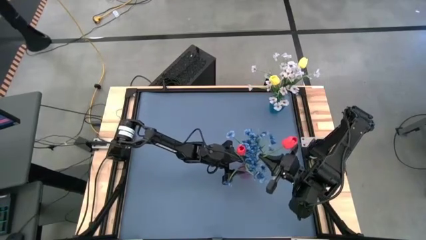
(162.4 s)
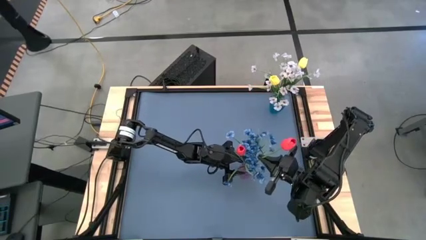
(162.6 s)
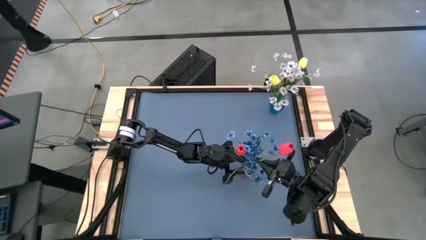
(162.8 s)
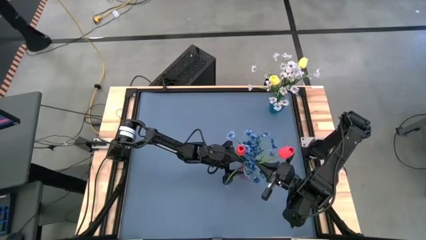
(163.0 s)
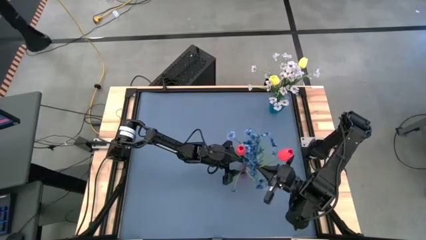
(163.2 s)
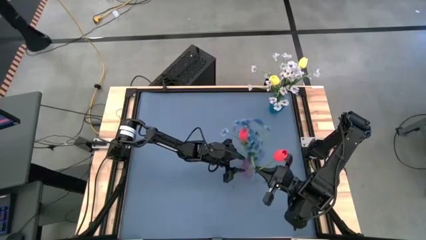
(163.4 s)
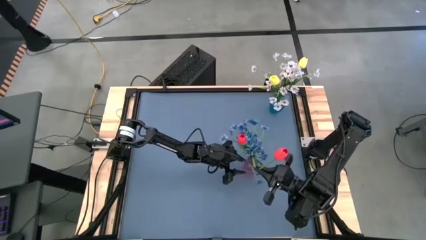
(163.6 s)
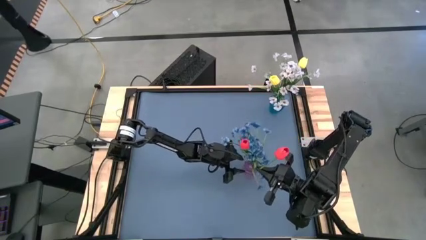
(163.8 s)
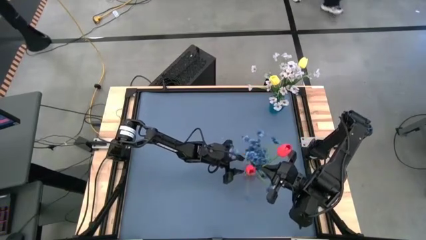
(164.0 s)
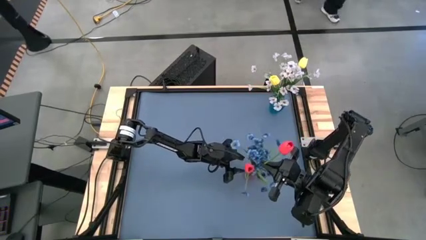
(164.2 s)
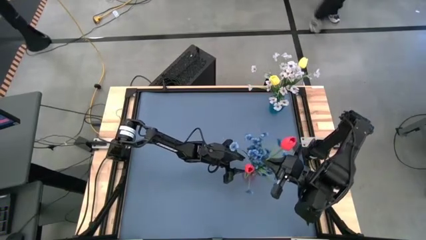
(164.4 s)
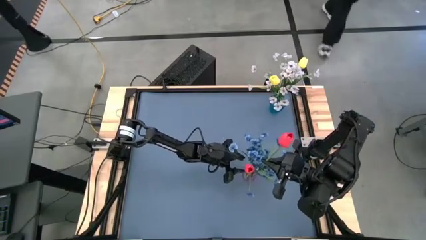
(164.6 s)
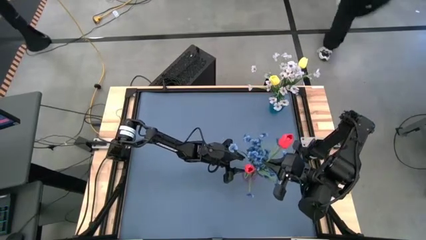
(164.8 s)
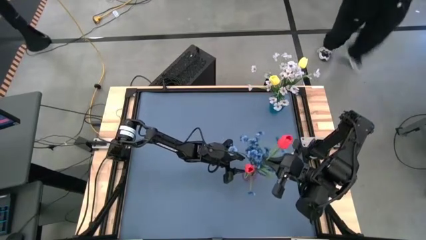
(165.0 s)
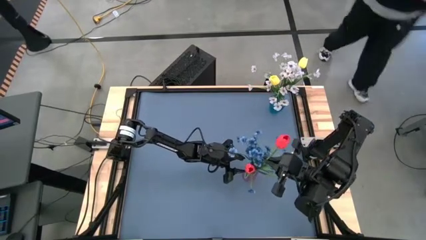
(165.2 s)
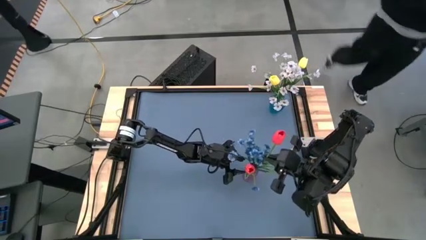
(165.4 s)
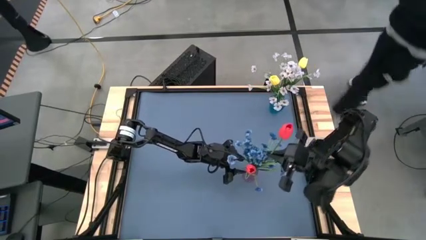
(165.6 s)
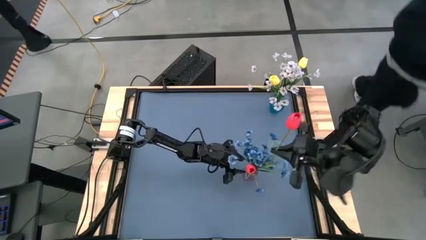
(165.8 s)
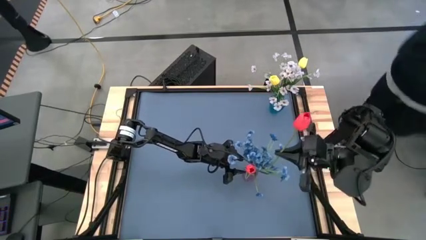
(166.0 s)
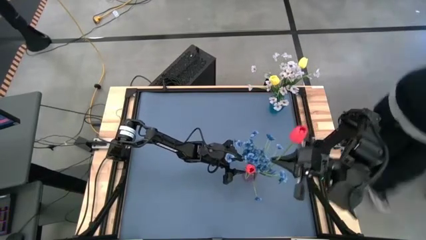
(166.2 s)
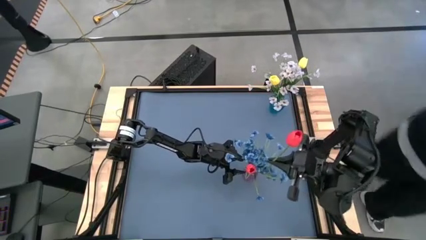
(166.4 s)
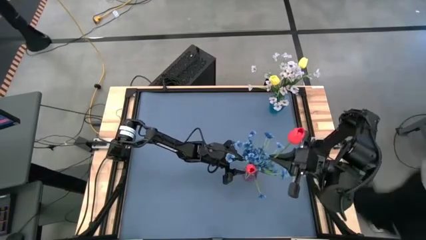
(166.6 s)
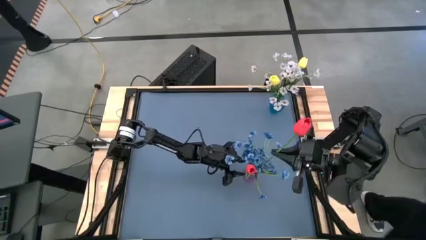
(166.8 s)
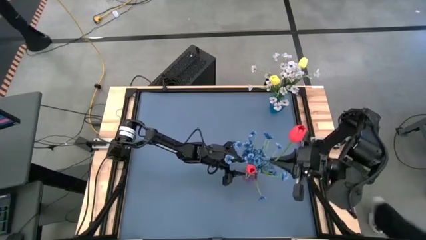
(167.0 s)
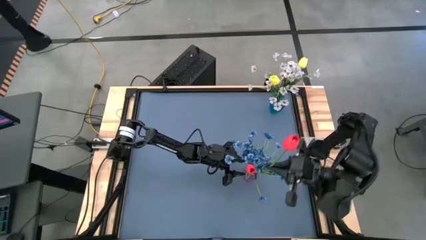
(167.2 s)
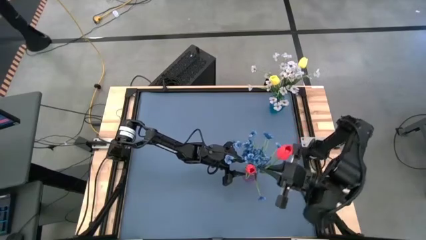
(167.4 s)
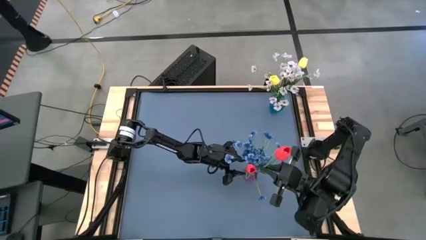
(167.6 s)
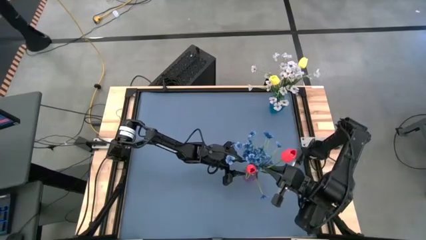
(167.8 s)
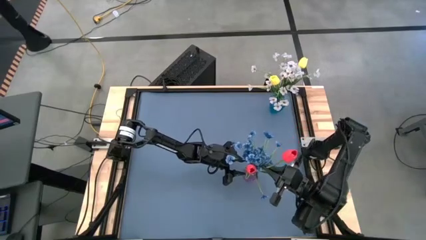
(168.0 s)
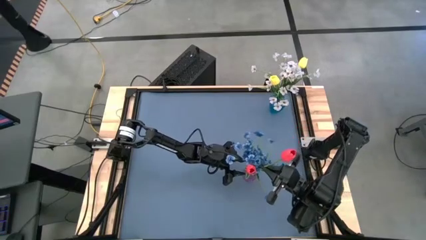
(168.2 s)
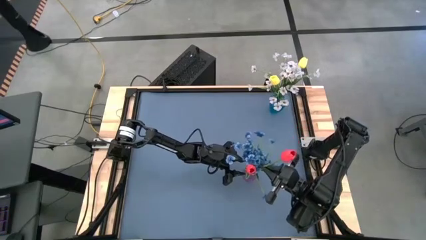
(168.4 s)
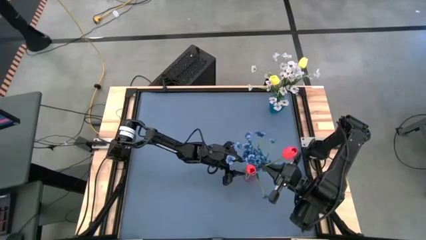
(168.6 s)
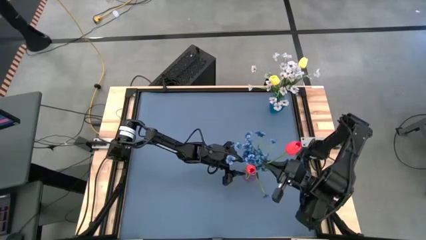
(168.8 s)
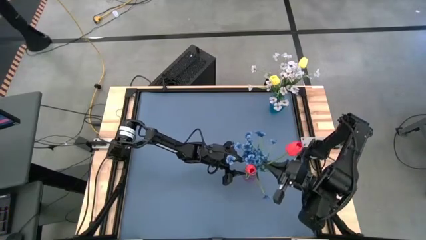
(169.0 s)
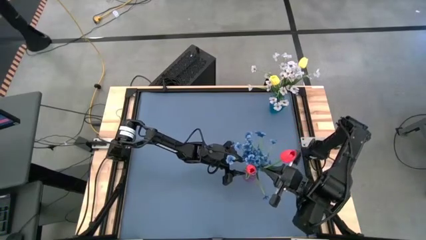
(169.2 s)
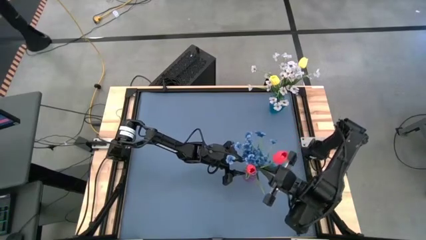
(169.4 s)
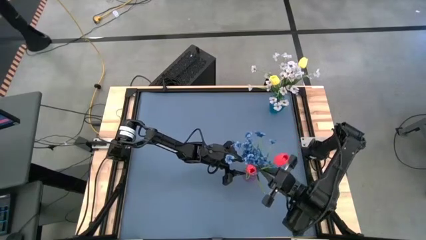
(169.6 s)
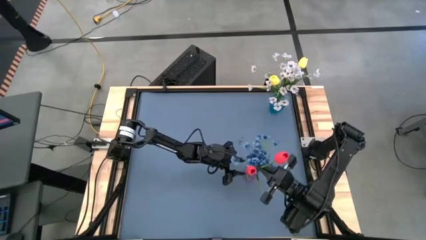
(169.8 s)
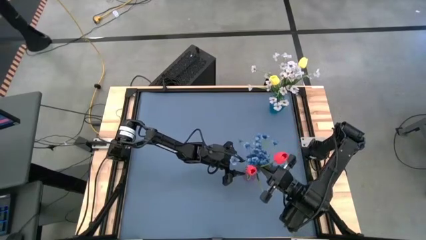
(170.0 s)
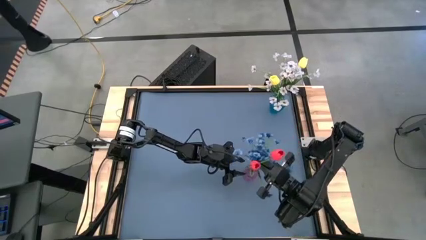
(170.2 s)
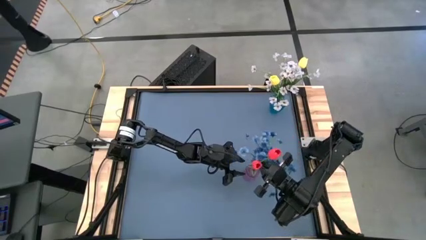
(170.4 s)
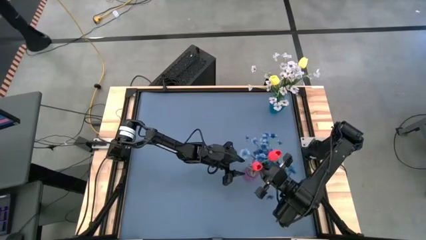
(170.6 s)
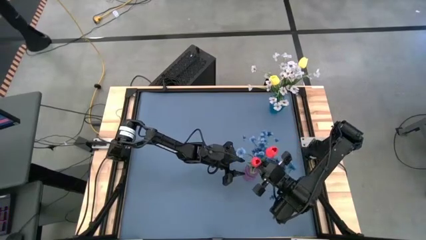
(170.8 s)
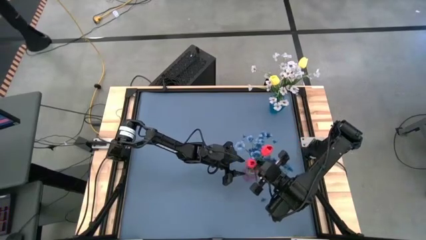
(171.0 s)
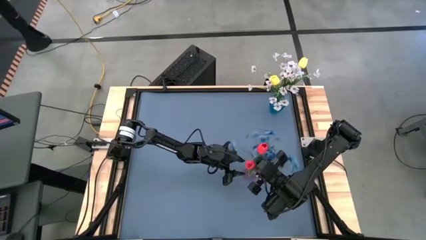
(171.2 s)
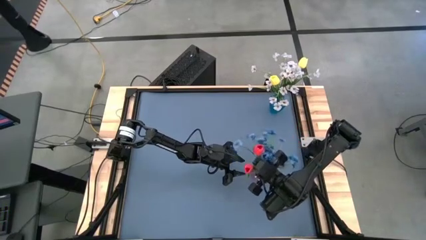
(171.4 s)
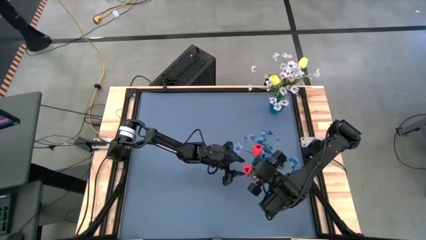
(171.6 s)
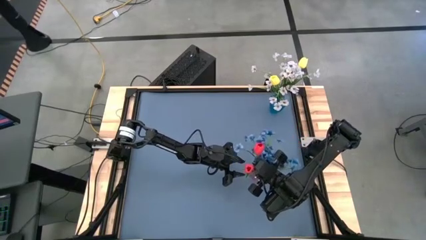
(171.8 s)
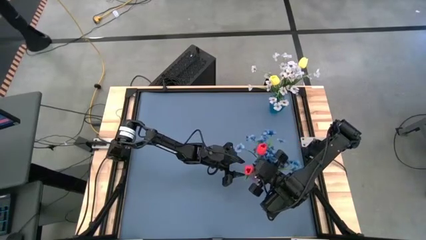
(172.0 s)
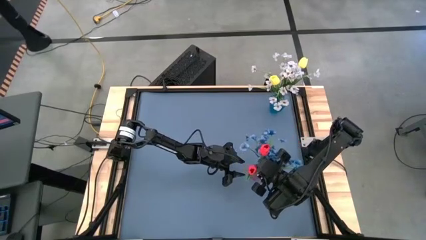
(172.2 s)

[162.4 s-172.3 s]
Task: Sort flowers into vase by color
Put the red flower into the violet vase

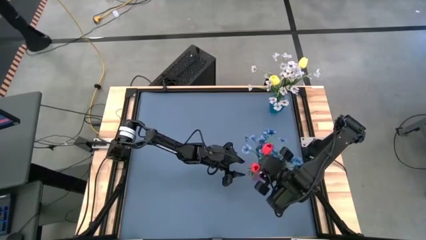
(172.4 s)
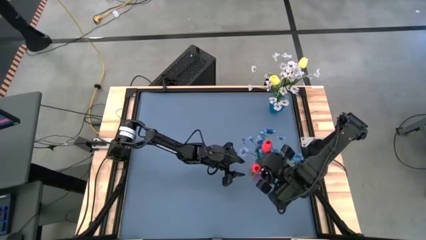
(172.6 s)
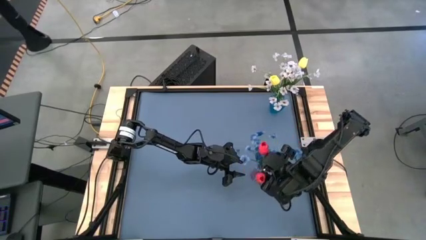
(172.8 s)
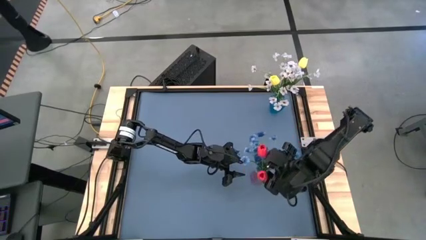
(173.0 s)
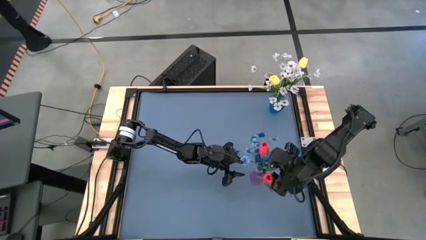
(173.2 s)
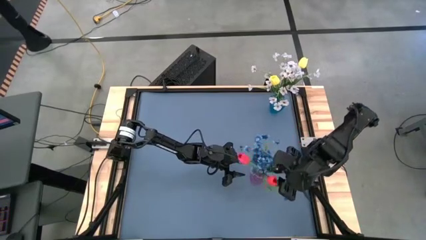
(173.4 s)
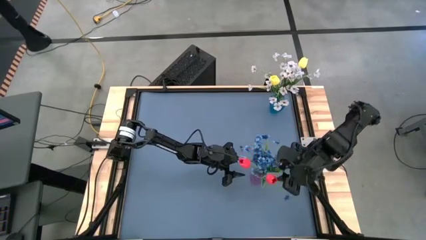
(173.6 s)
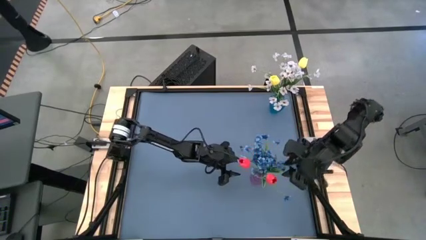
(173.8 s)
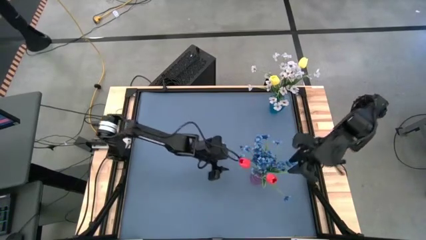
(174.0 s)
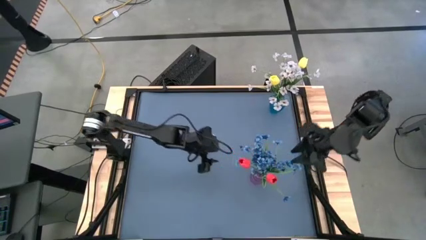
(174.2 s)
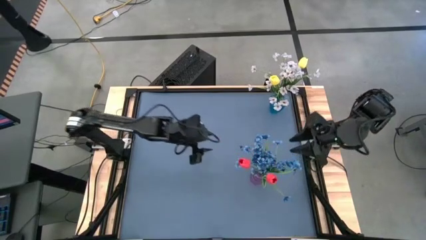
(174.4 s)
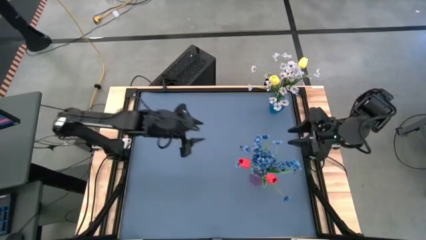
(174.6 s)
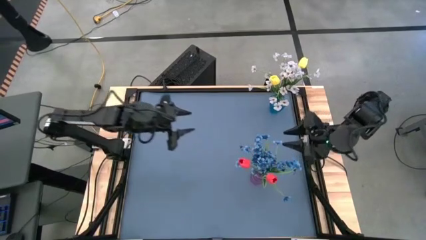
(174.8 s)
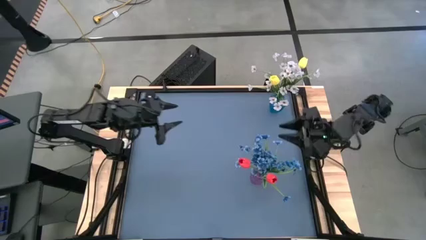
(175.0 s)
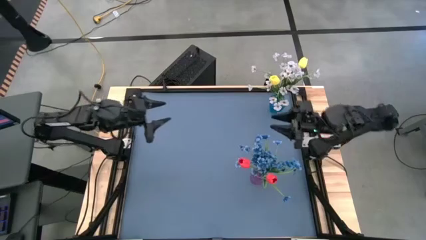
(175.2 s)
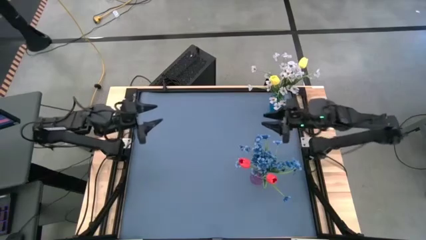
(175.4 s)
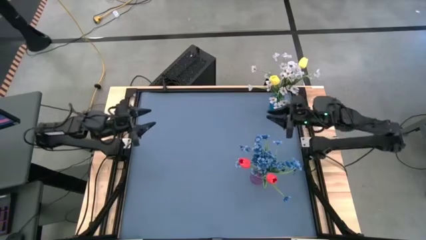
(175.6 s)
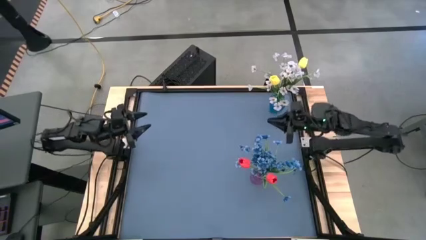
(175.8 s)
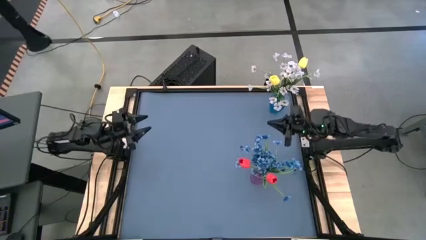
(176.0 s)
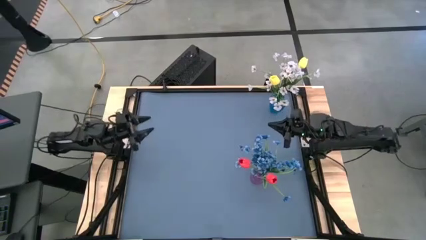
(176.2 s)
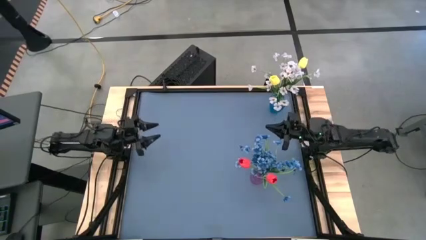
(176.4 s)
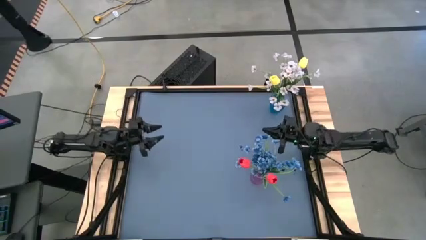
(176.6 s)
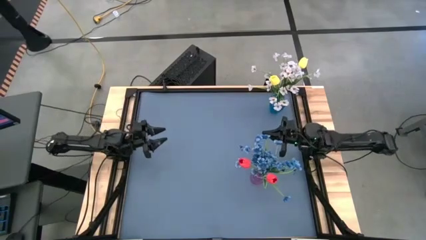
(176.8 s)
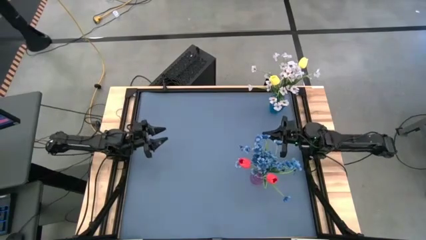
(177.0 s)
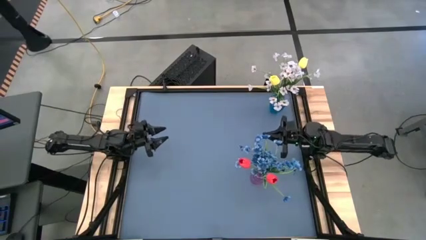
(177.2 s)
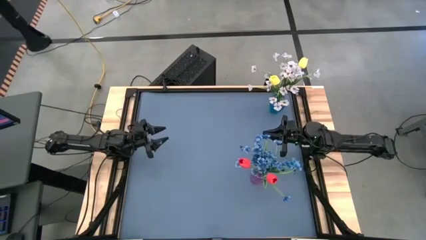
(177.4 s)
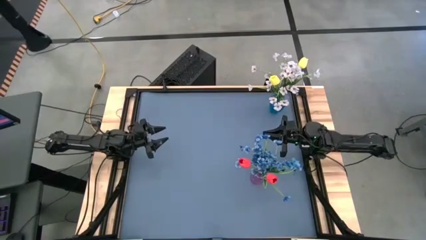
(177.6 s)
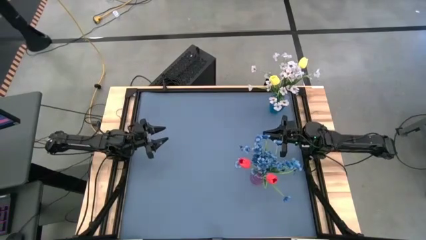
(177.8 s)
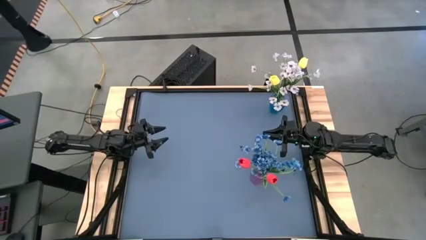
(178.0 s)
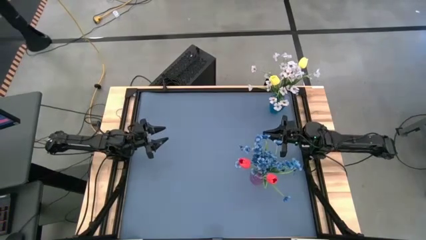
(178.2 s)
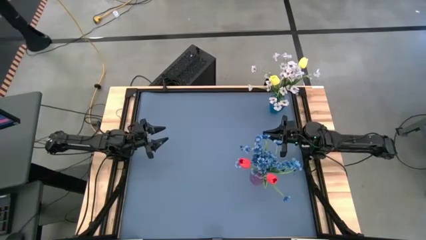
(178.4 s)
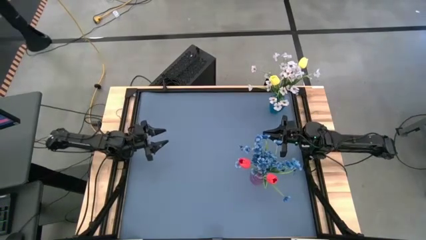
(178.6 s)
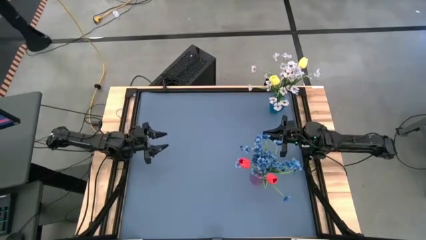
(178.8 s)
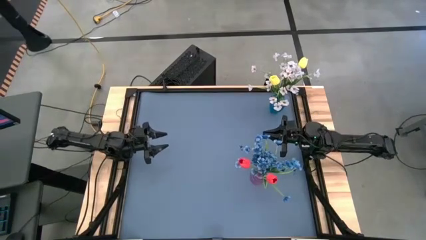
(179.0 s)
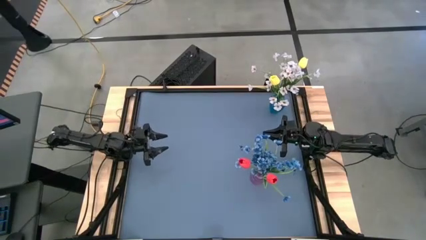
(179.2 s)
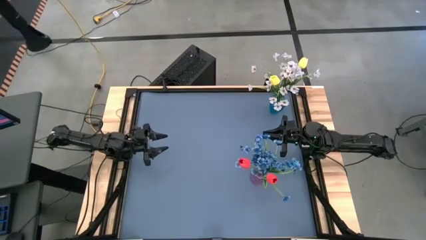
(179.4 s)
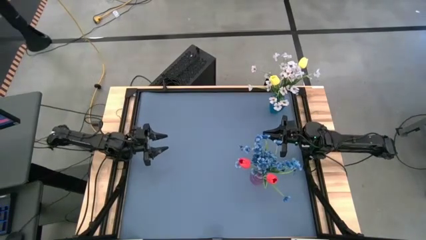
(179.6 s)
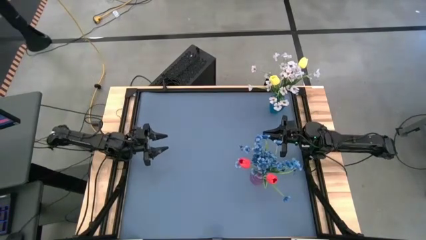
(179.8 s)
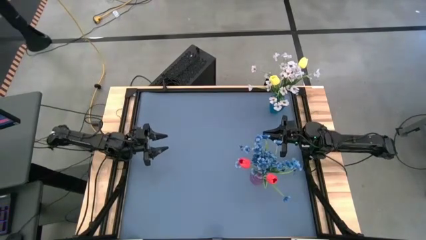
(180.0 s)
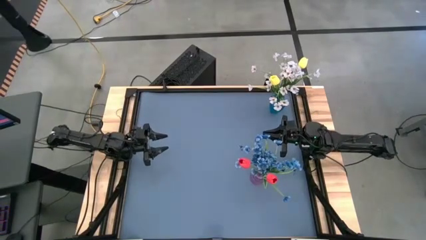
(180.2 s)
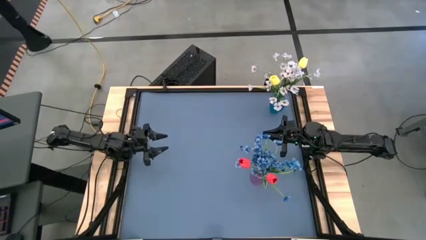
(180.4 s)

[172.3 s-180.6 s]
Return to Home Position
